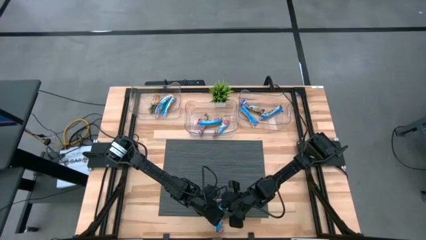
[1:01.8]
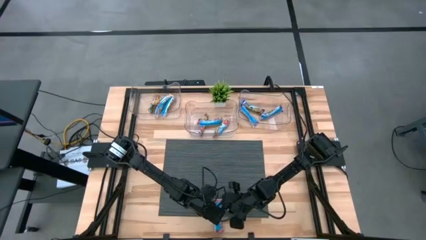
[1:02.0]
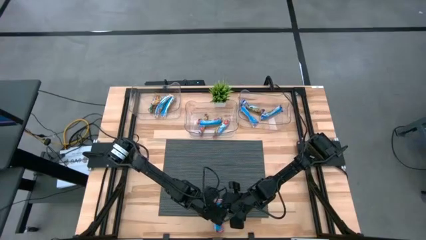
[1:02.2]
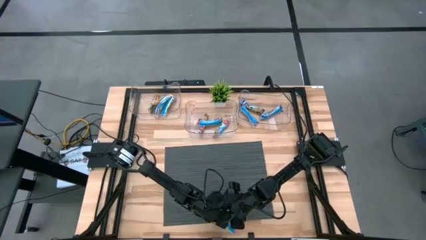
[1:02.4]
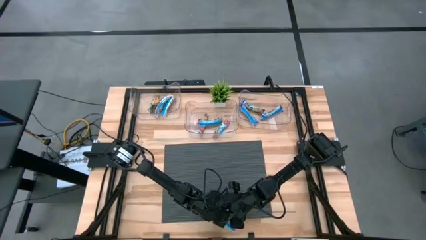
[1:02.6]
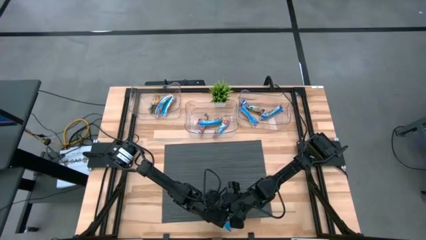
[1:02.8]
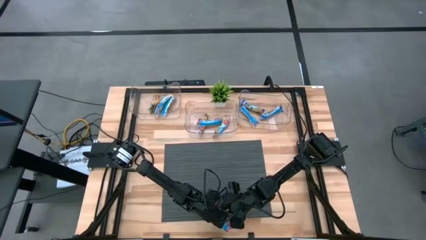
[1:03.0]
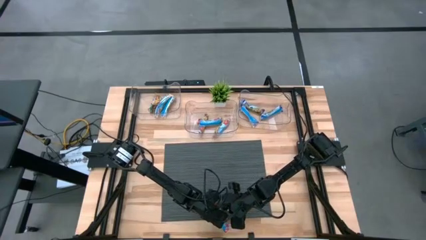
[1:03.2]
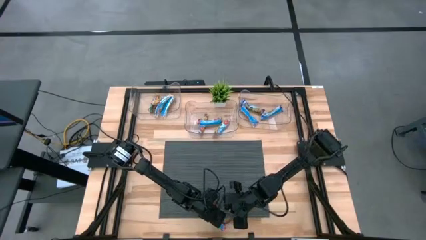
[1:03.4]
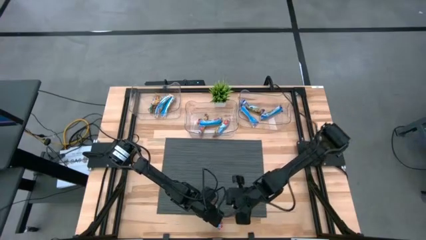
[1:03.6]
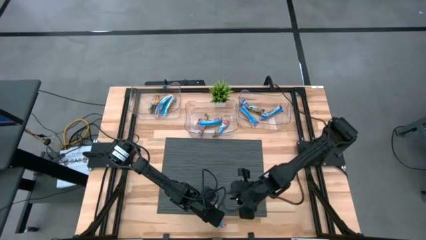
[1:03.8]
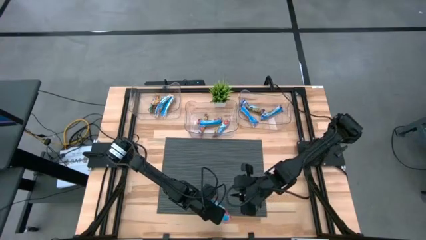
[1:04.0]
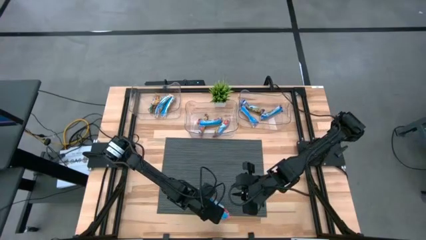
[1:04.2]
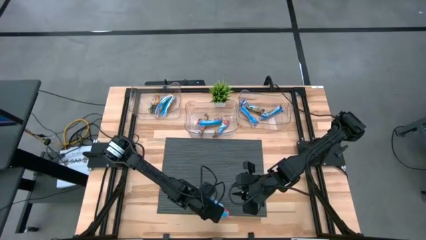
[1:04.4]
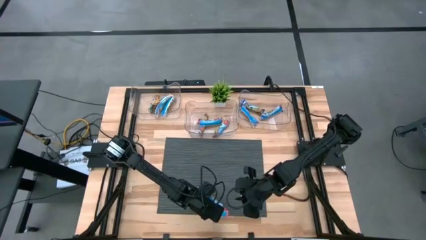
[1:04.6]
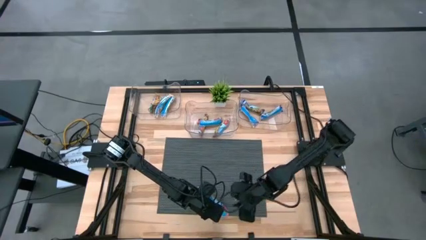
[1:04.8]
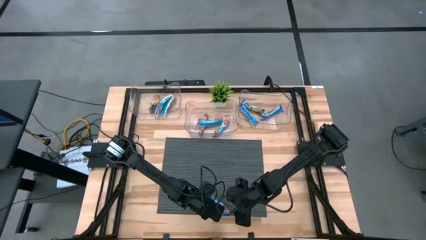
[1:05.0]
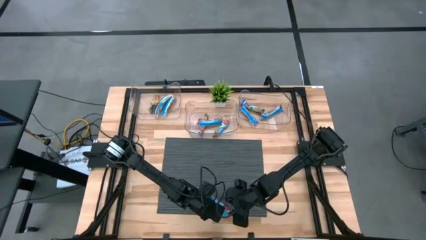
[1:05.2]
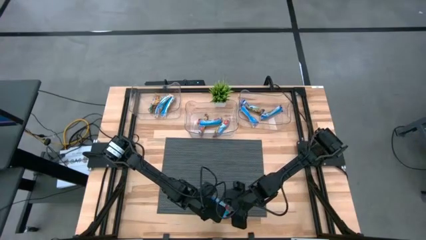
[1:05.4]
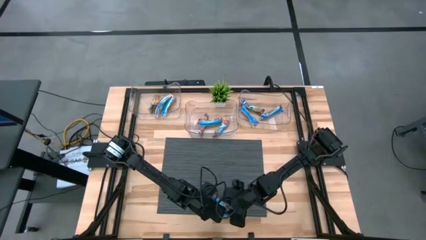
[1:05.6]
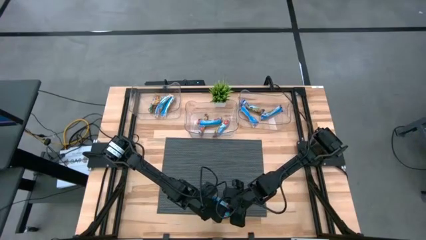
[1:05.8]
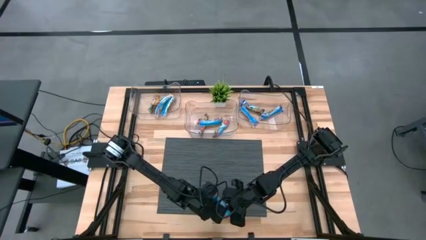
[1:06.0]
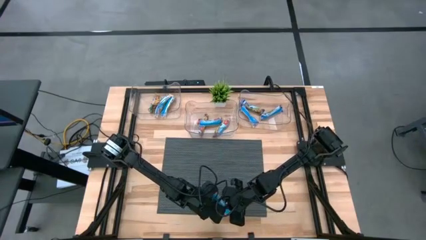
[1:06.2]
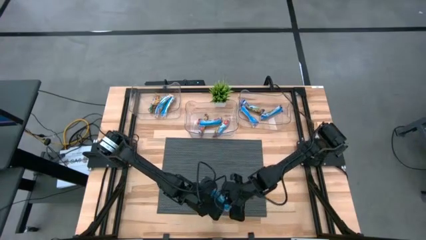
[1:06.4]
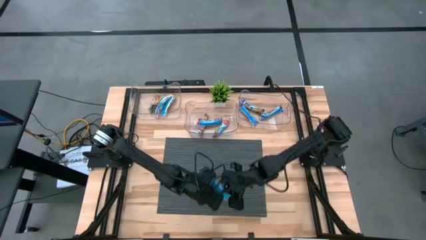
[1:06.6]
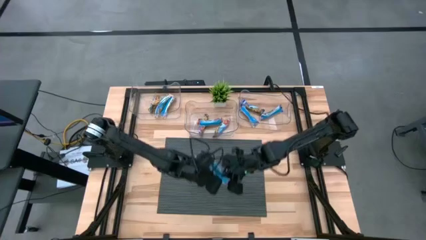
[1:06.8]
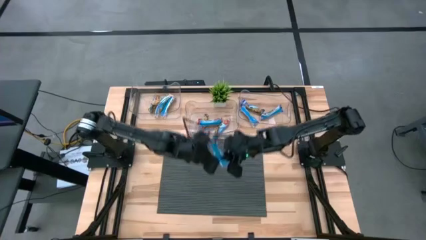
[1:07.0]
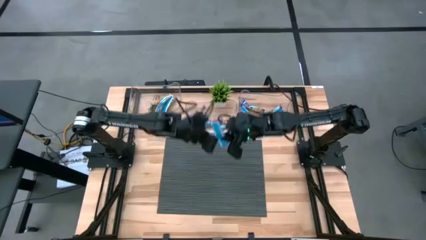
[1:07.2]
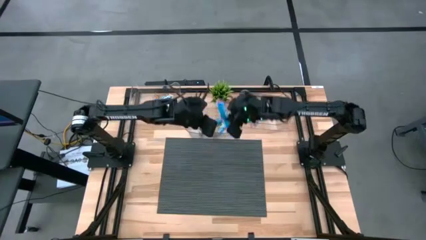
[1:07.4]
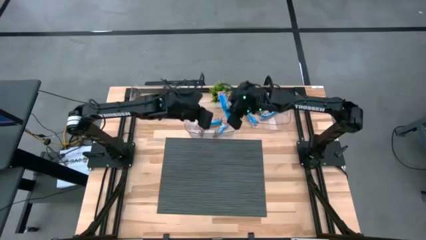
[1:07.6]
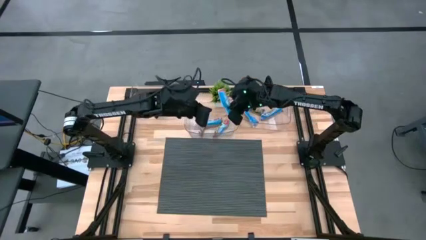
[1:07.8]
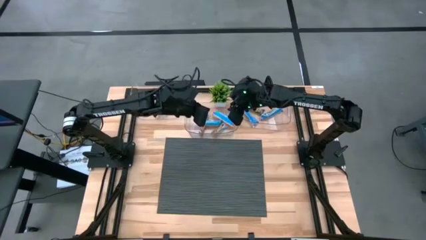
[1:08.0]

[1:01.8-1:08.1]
Task: Pick and place Granola Bars by type
Put the red granola bar into the center transparent bin

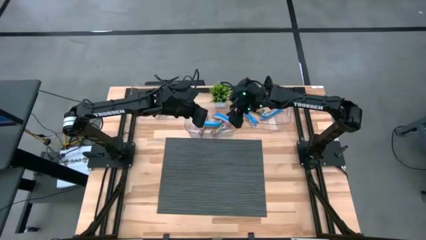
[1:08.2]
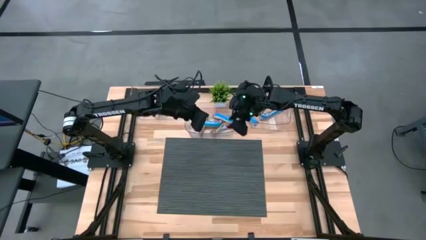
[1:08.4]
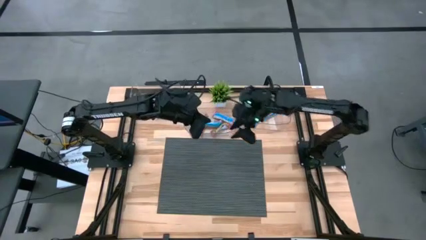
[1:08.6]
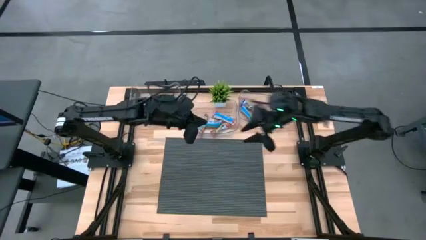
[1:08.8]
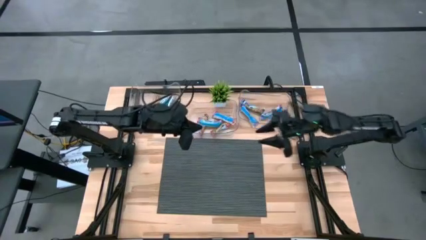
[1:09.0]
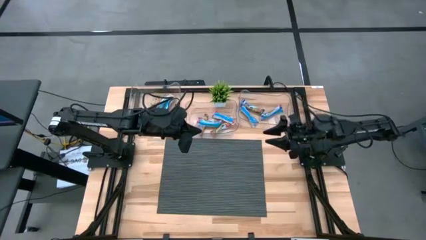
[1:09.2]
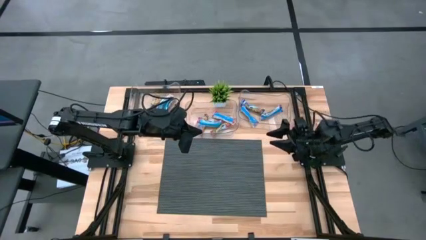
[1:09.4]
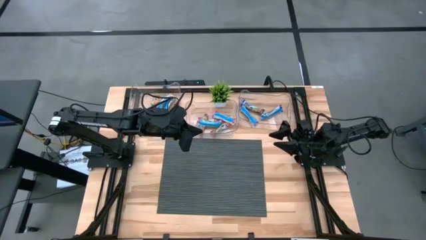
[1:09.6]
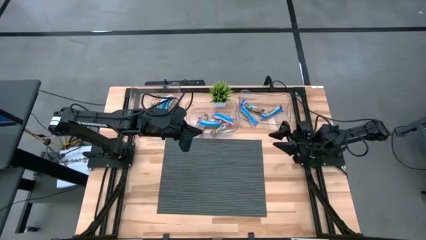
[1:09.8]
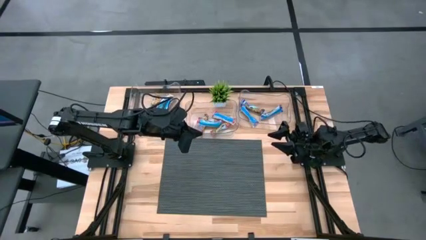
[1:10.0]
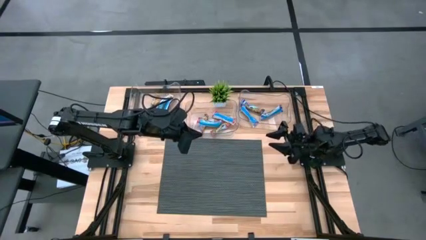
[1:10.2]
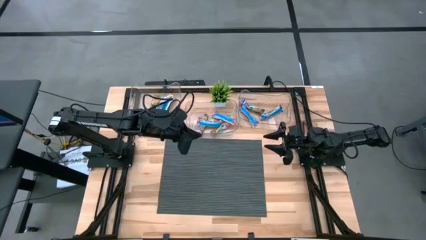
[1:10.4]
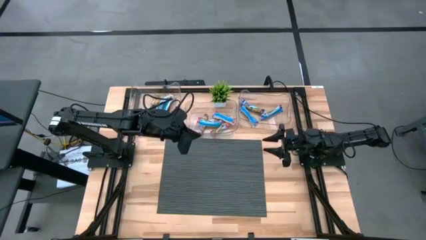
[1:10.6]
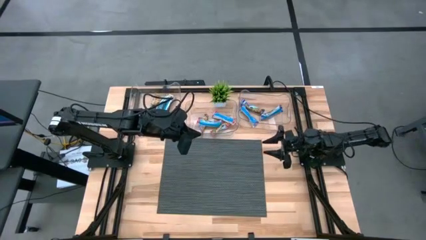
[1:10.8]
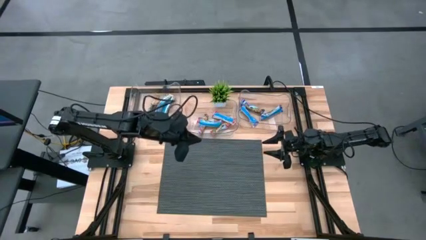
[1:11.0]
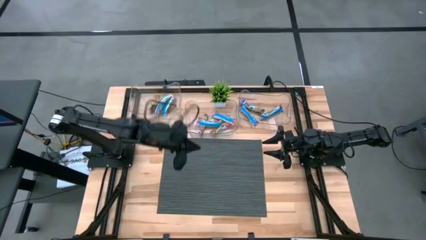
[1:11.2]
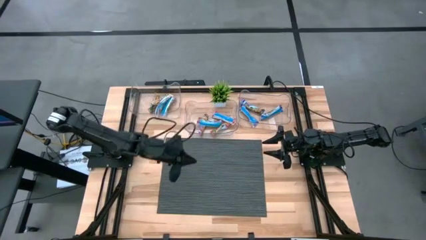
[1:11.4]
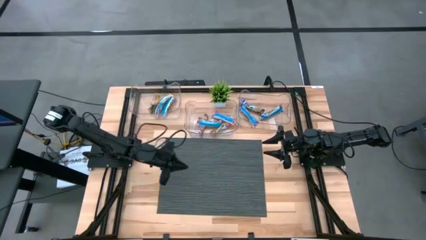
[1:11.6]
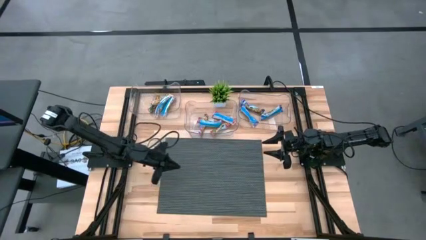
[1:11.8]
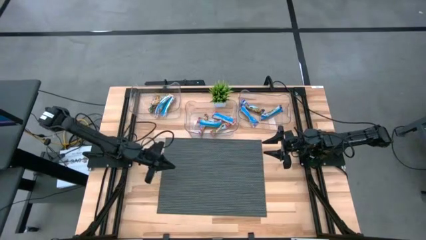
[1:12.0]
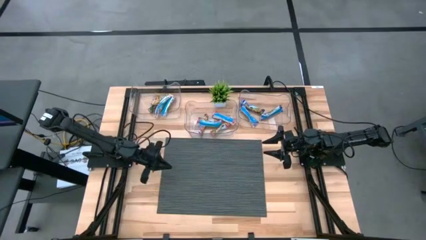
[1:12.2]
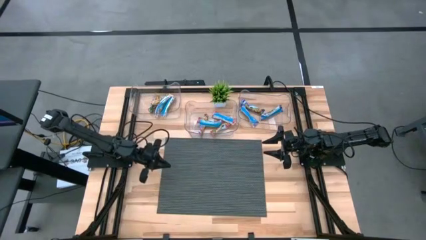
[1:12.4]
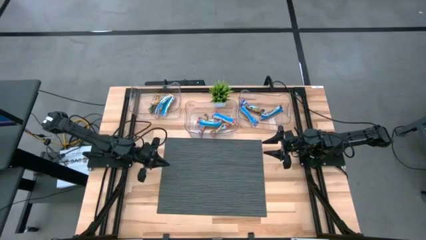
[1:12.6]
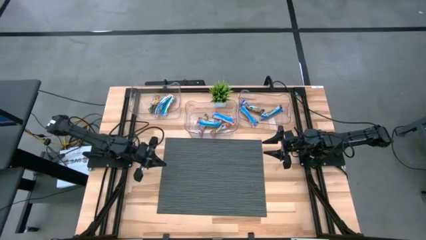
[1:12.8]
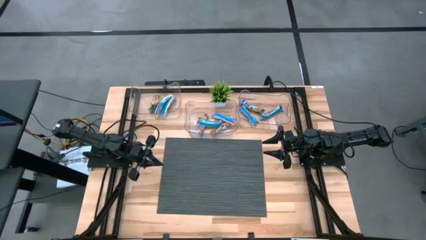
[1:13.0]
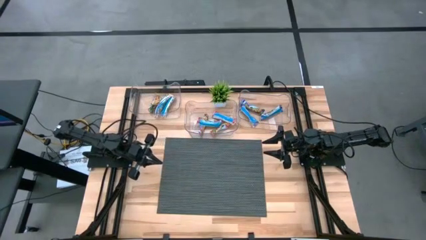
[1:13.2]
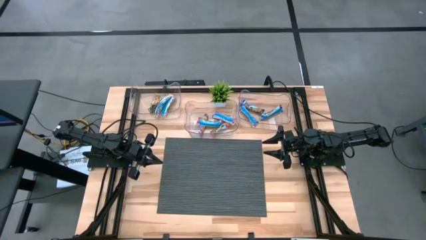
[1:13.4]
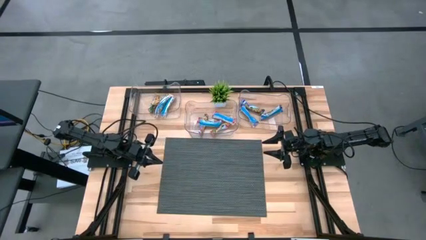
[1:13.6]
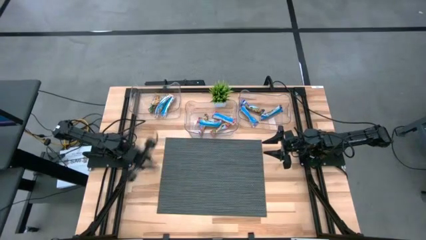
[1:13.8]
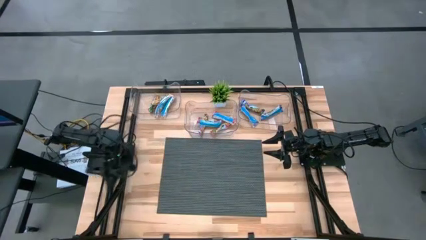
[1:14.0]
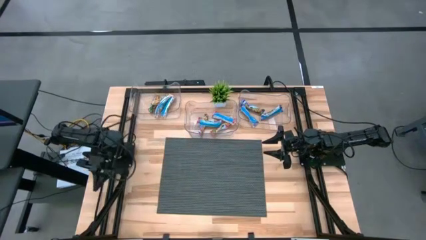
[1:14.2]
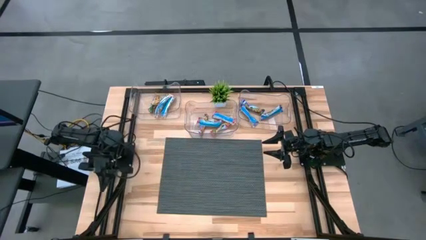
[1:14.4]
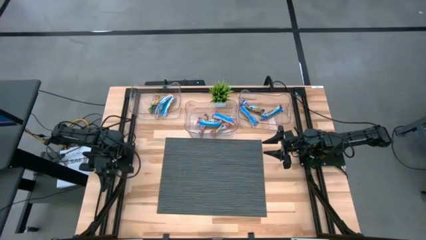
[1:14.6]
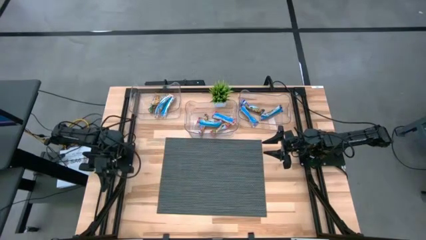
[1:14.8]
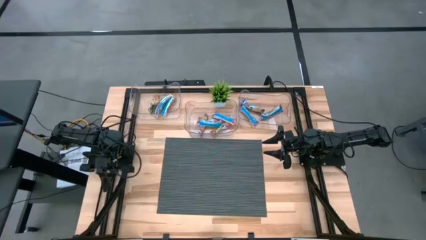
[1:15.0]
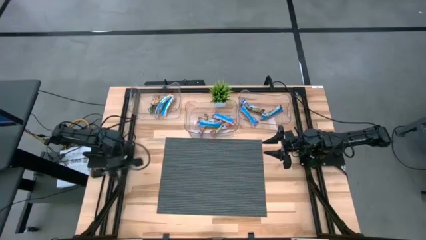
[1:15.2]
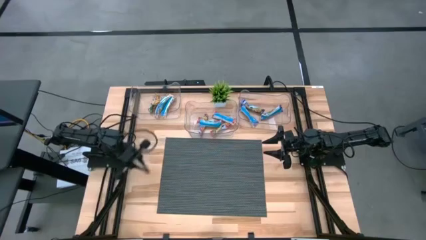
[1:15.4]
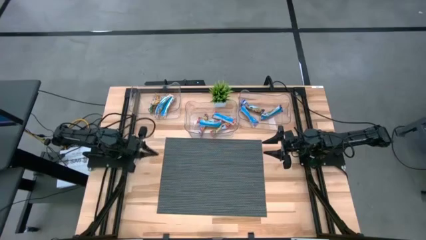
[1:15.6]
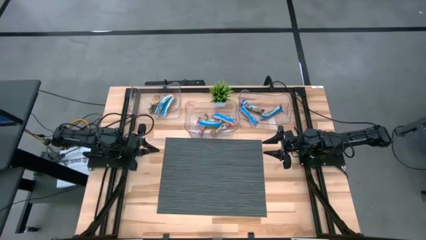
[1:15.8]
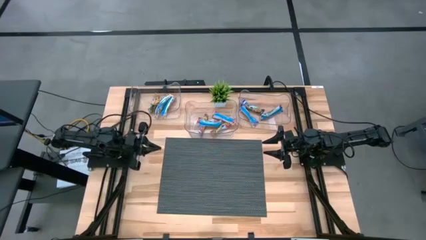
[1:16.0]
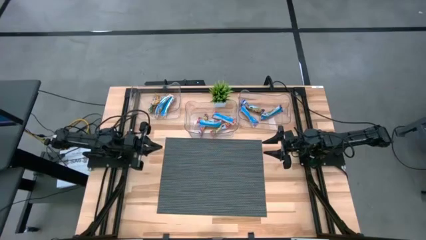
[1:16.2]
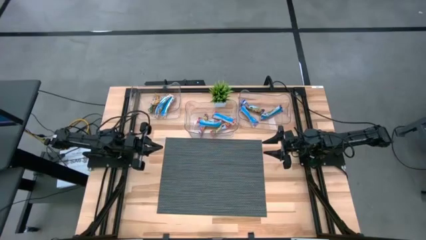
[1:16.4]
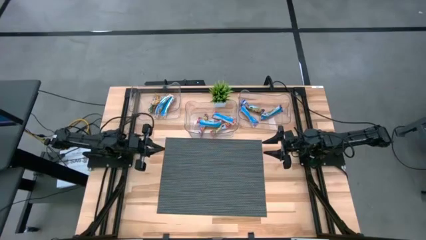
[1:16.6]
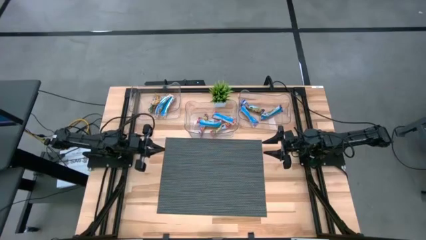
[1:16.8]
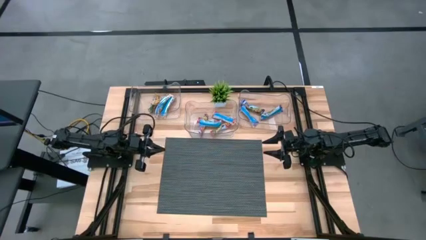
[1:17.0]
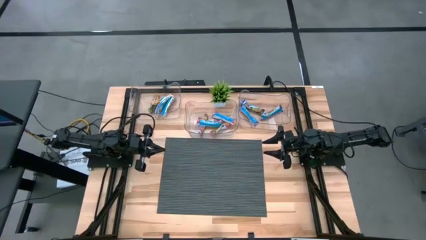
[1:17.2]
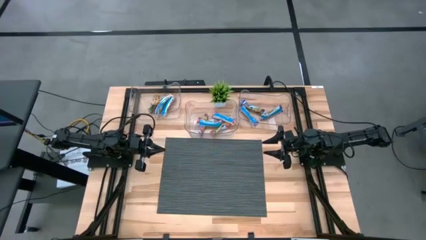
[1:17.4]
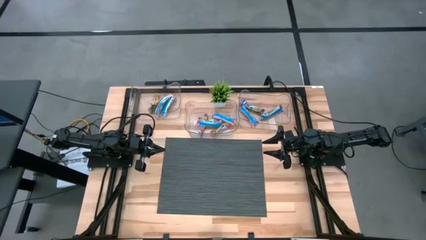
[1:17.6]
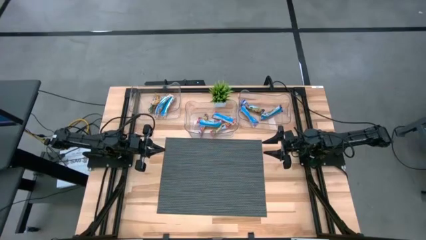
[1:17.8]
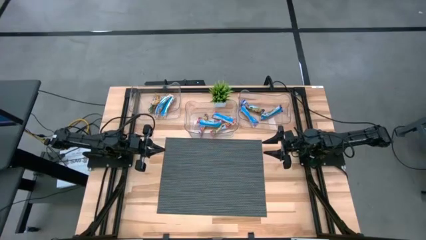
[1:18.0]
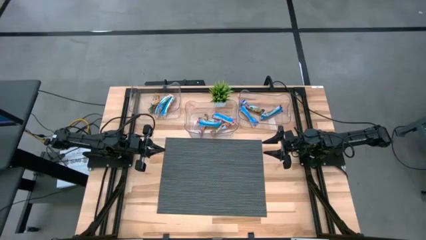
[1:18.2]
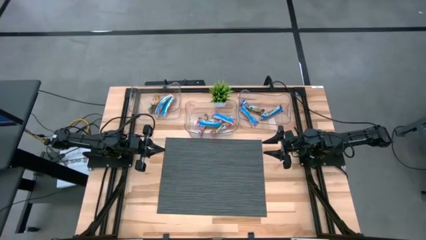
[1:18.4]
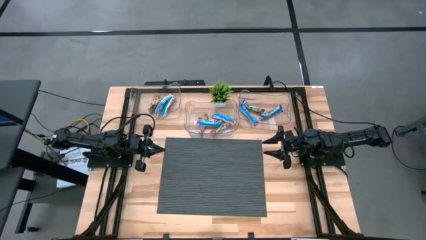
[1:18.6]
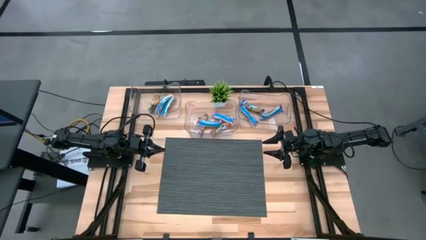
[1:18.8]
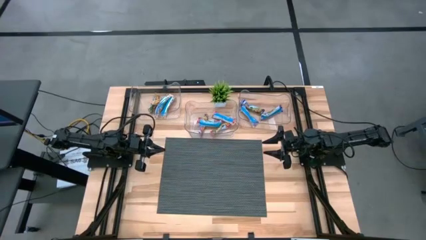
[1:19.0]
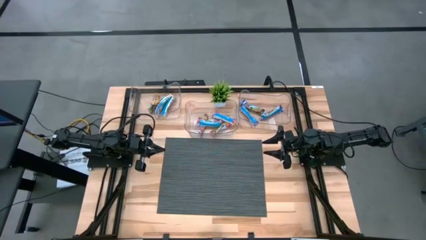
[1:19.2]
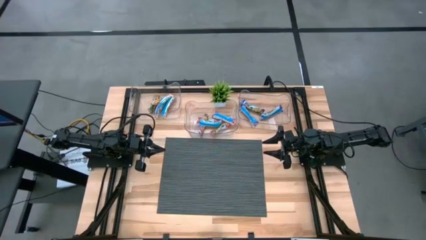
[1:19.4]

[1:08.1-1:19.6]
Return to Home Position
